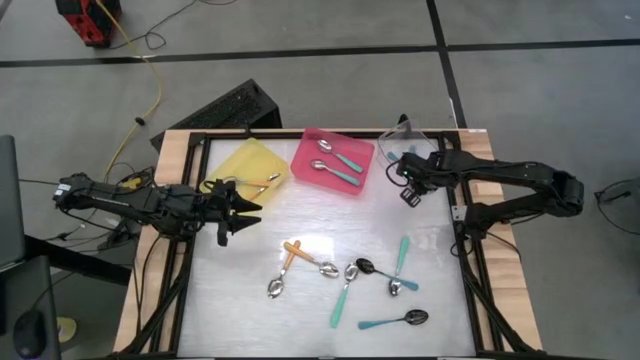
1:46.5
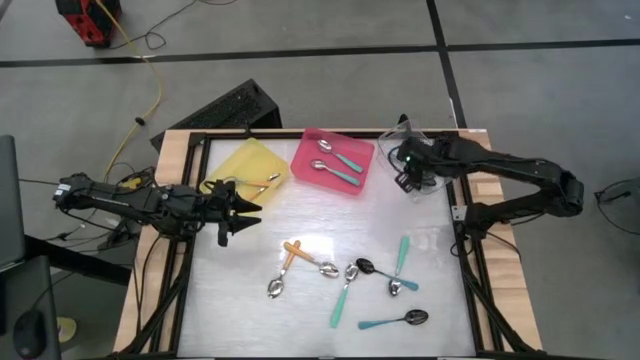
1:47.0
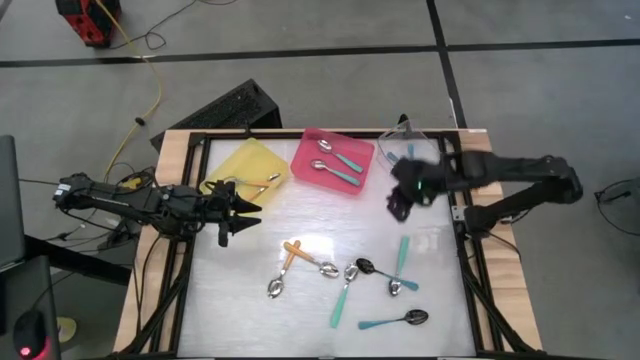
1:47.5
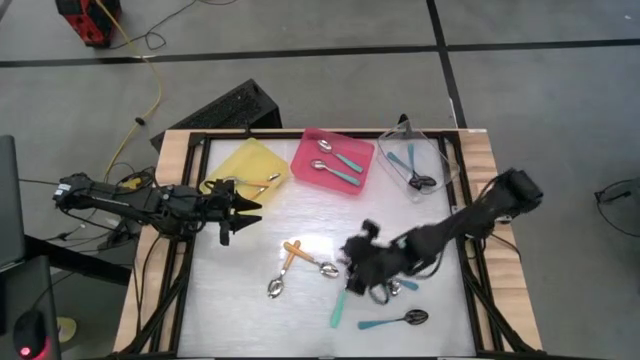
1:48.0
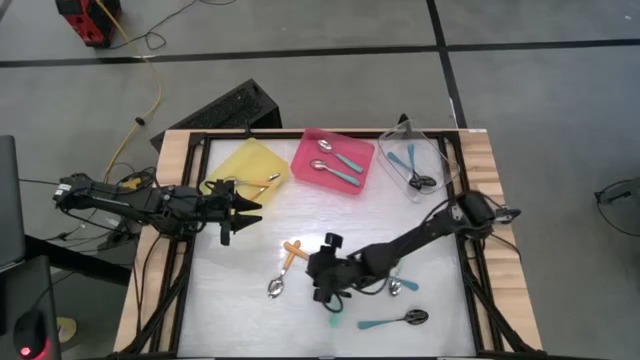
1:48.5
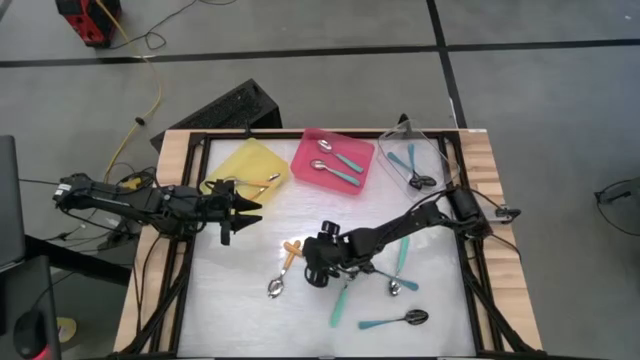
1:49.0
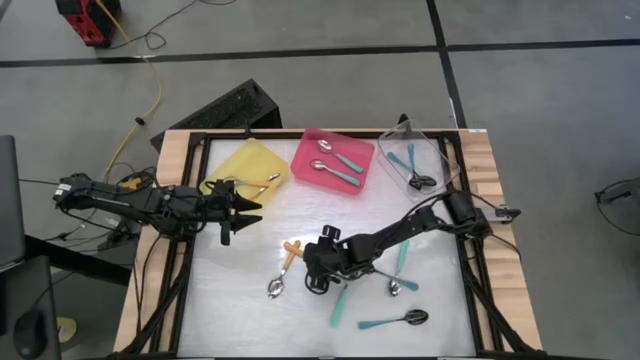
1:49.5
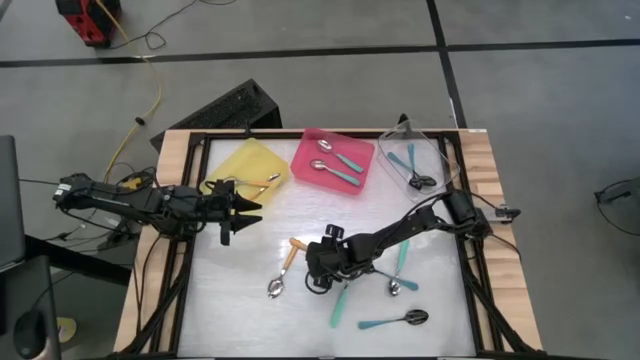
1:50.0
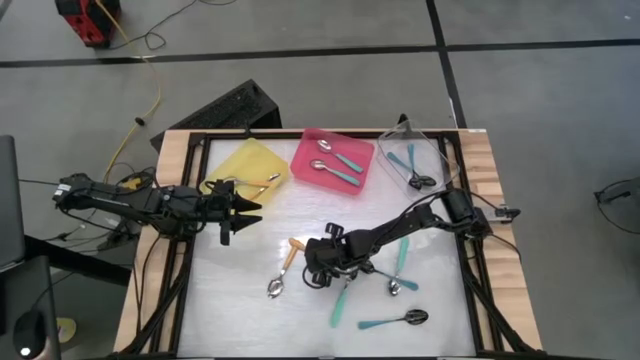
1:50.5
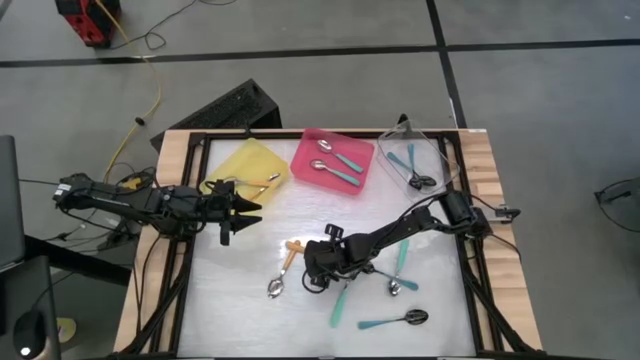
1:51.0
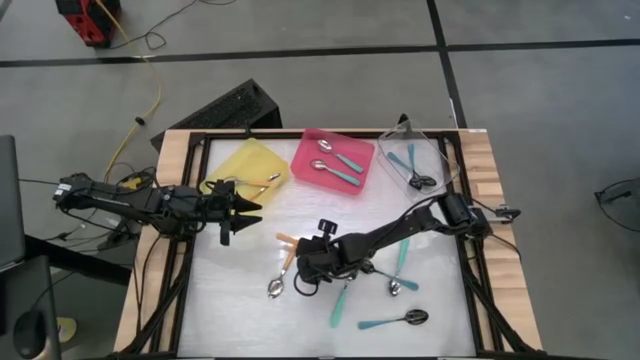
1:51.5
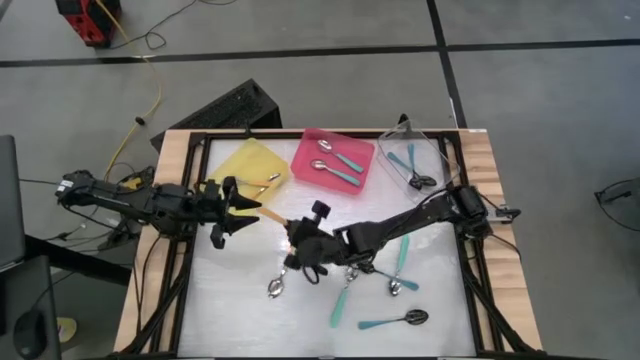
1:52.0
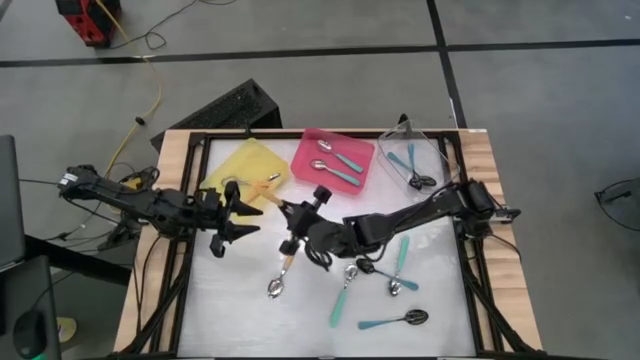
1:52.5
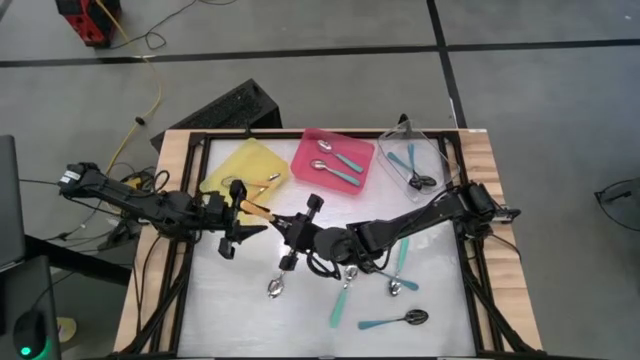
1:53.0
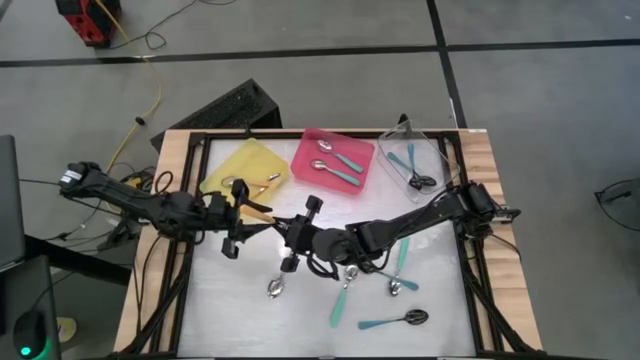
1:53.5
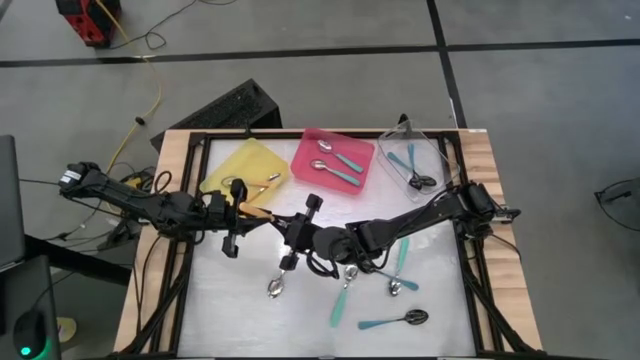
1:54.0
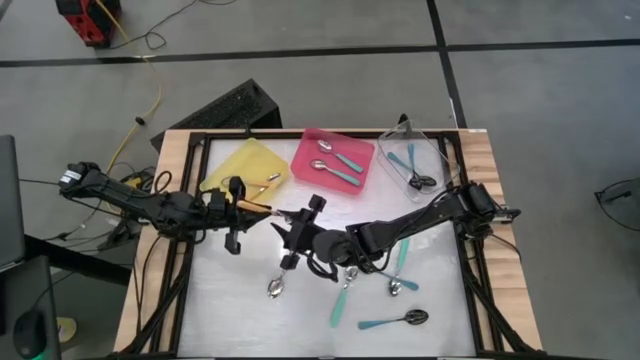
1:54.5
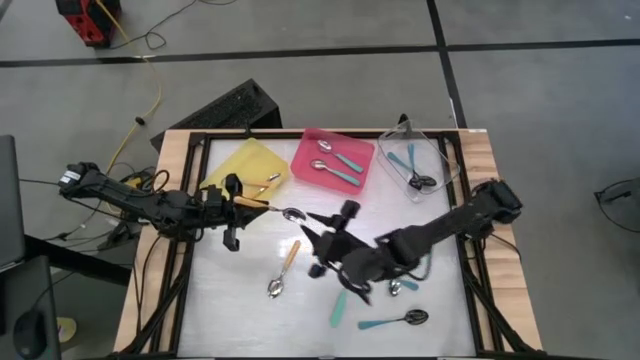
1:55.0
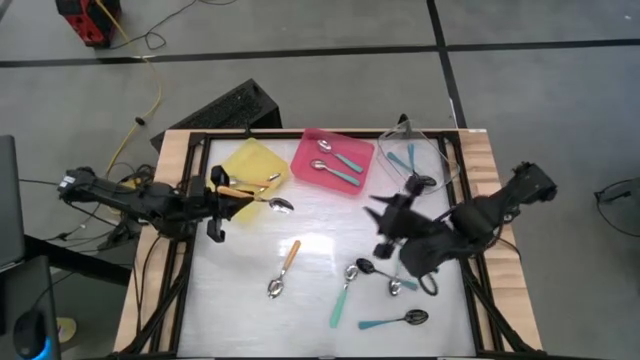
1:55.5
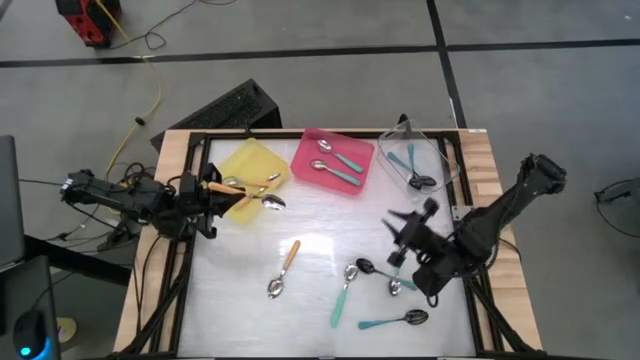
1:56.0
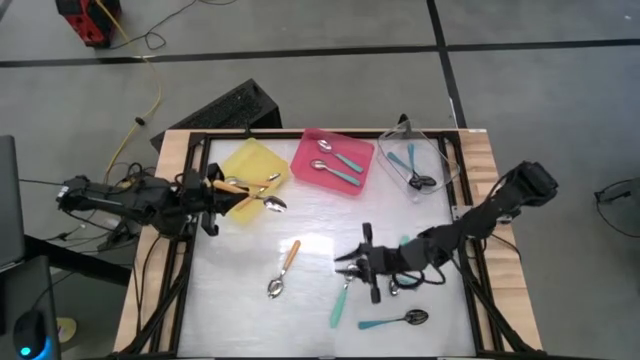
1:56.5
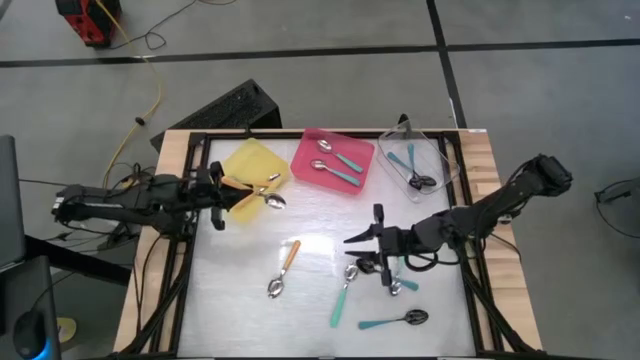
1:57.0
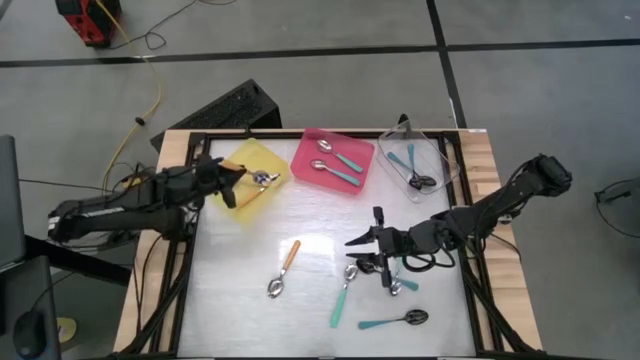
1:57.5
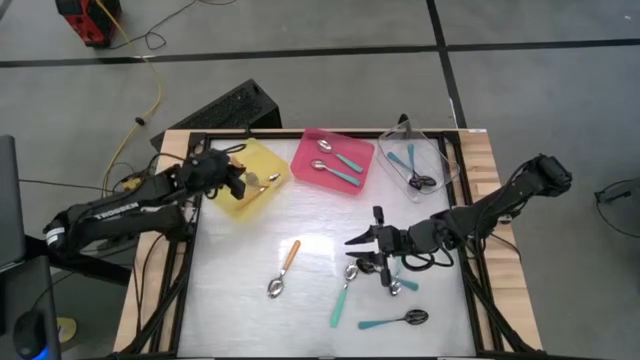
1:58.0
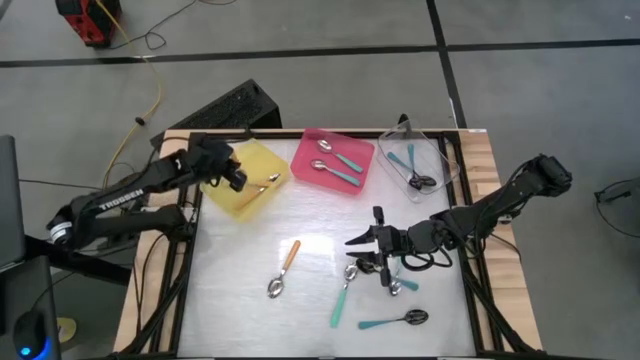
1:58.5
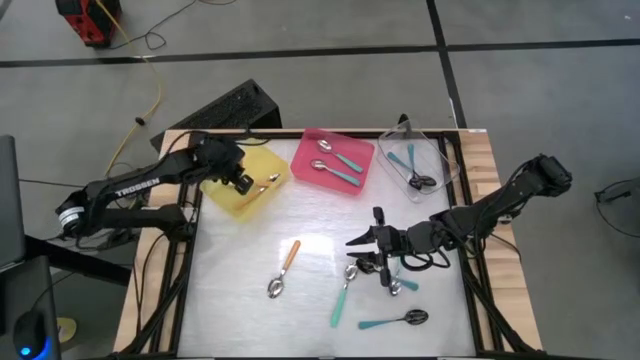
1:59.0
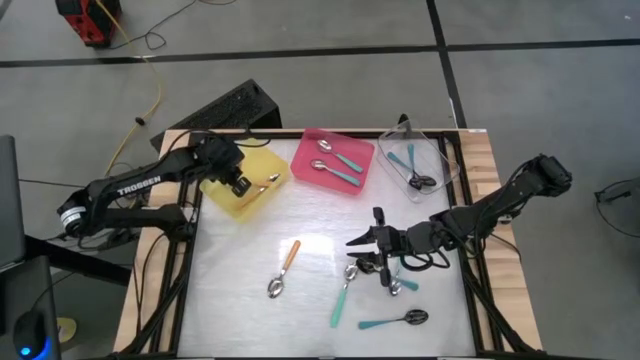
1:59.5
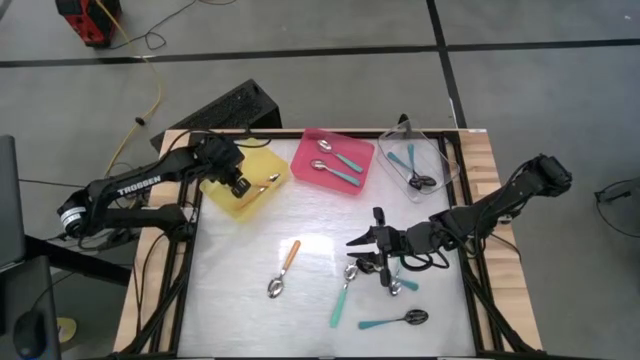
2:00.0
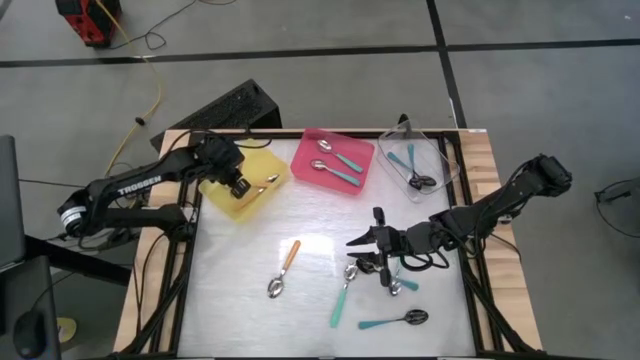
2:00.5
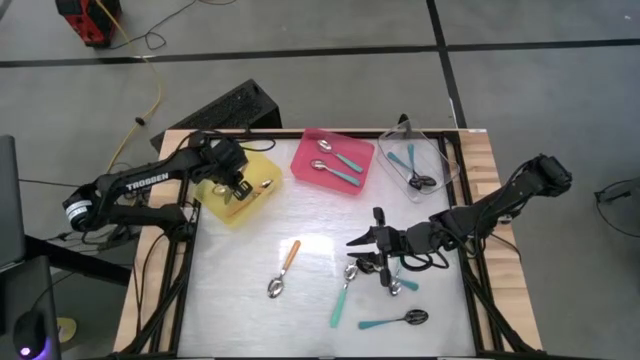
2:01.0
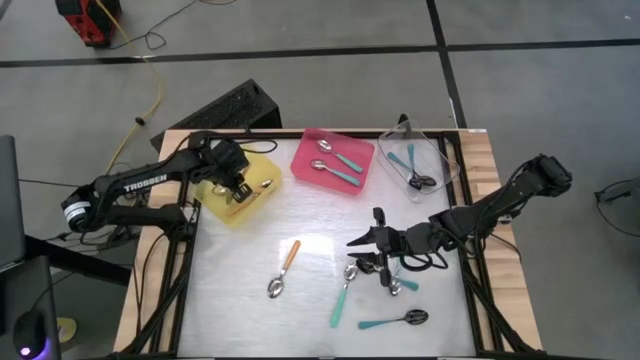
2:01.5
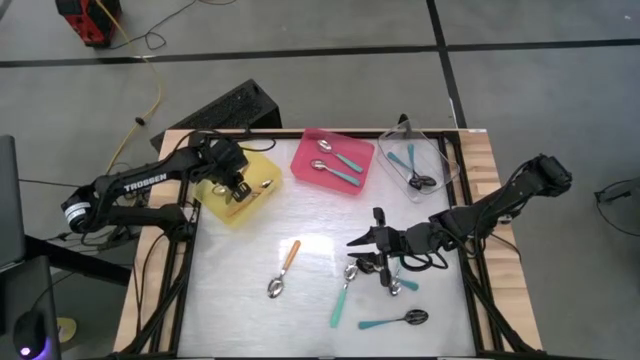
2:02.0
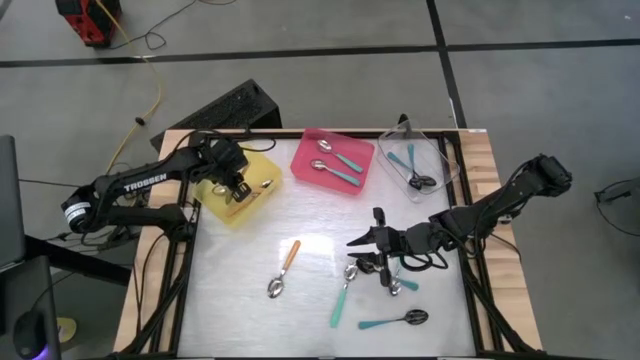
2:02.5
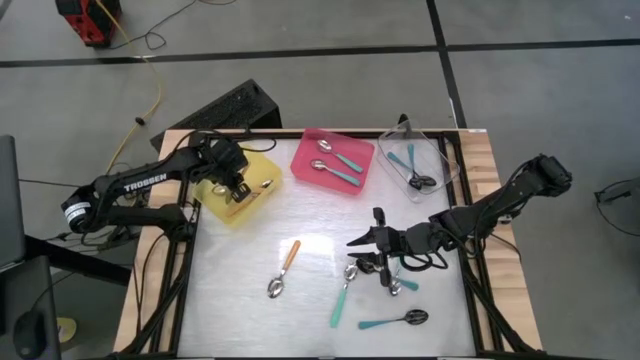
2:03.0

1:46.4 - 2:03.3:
Task: Sort silverware by color (type)
Put the yellow spoon into the yellow bin

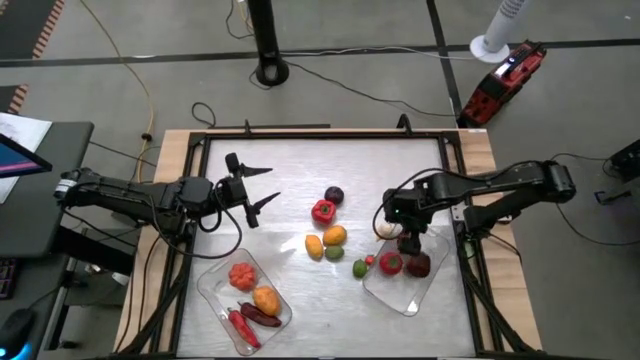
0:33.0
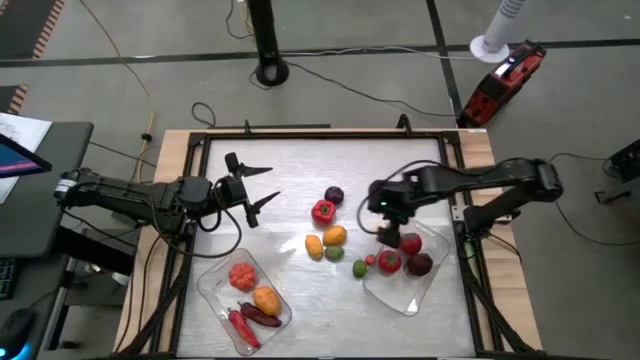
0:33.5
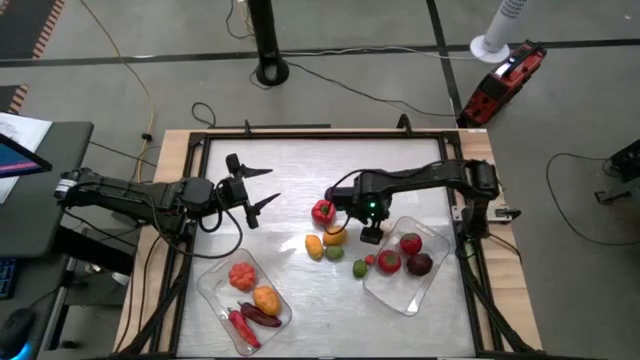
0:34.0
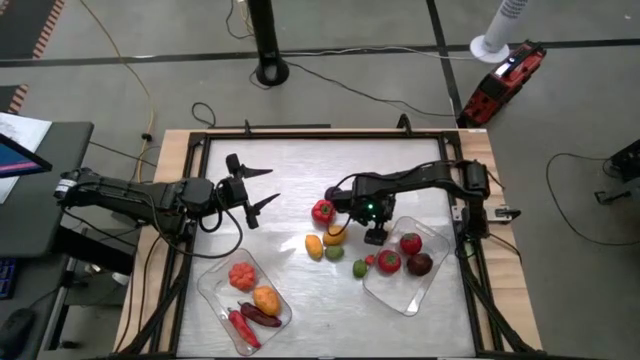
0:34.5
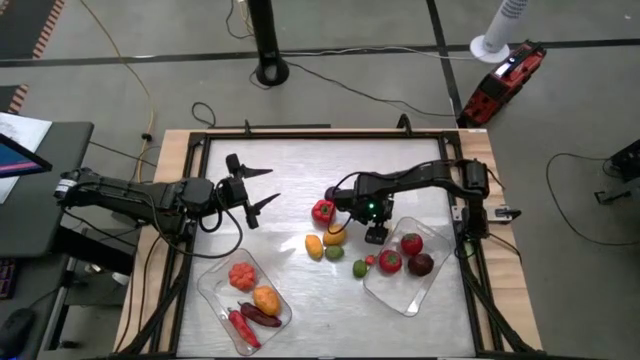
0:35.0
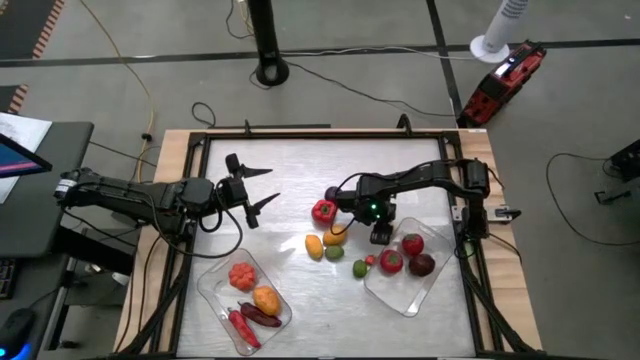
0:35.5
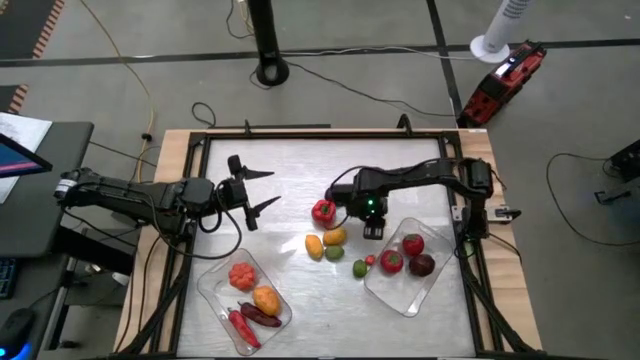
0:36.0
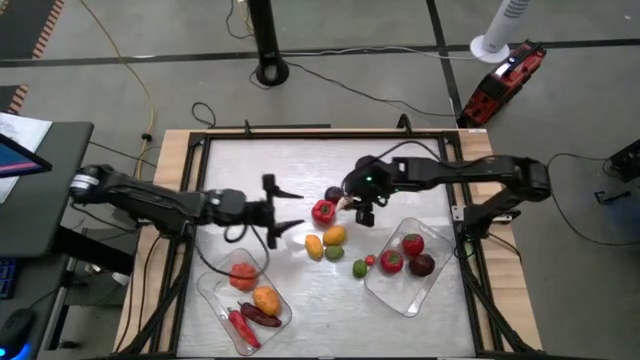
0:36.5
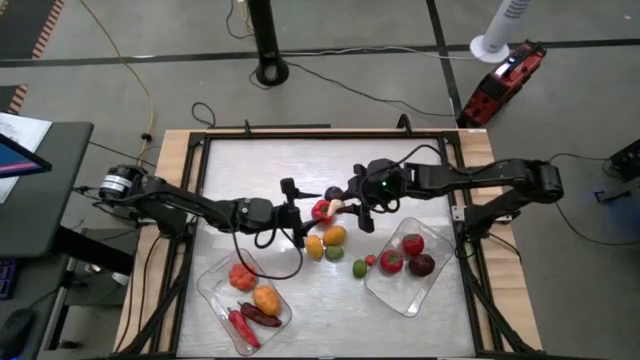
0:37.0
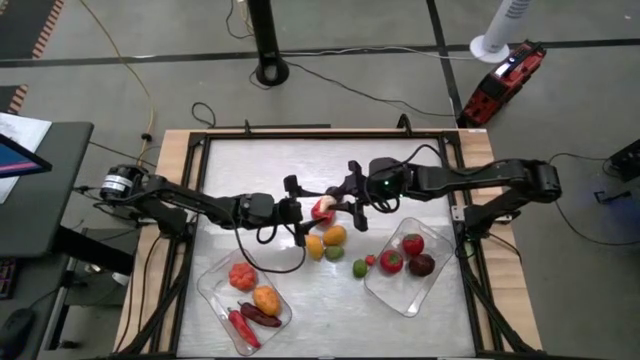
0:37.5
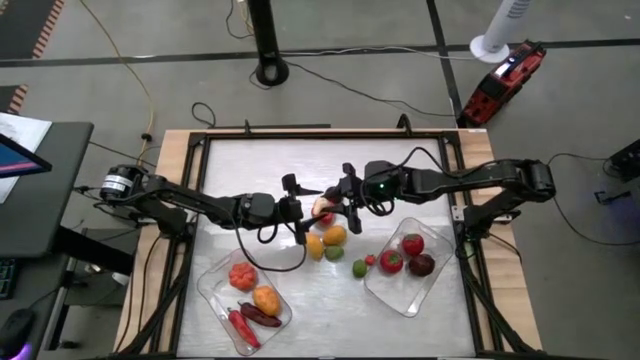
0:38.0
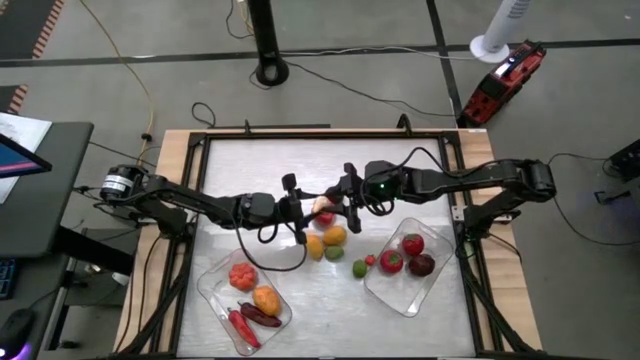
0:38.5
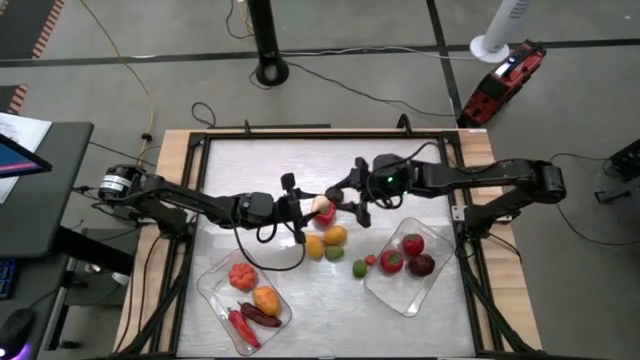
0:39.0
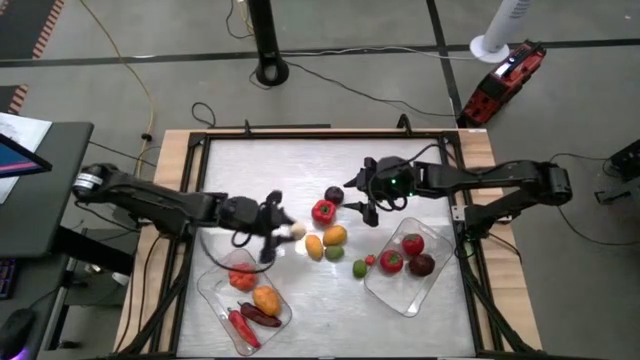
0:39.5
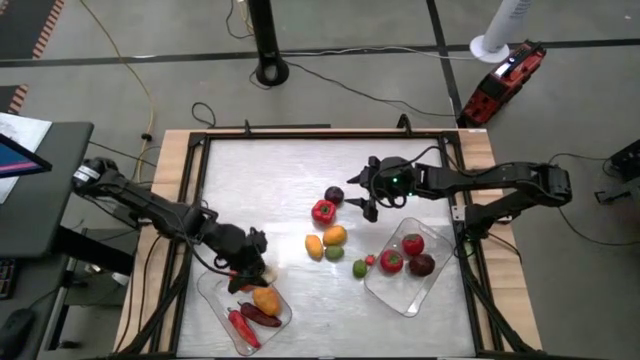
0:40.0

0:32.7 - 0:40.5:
Task: Sort produce into baskets
Put the garlic into the left transparent bin
